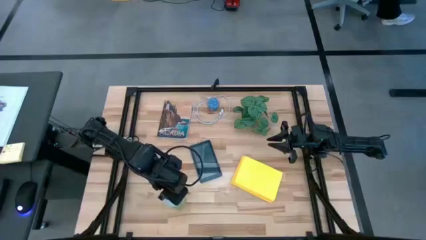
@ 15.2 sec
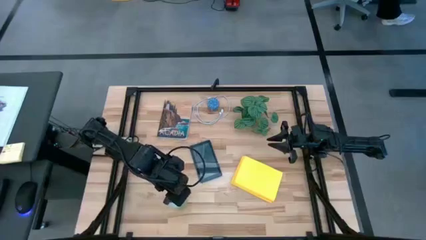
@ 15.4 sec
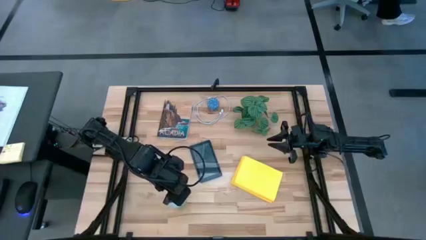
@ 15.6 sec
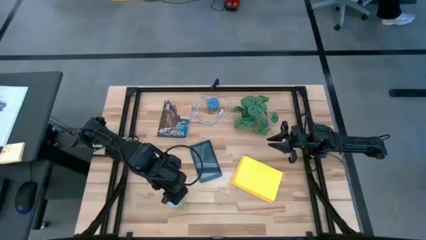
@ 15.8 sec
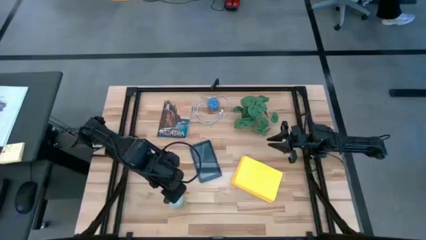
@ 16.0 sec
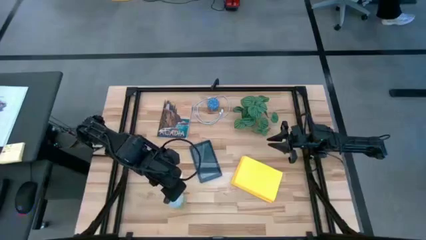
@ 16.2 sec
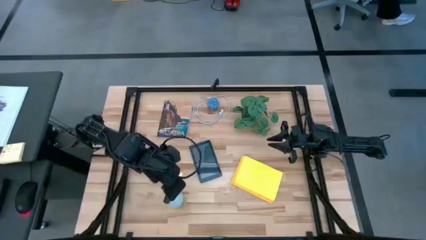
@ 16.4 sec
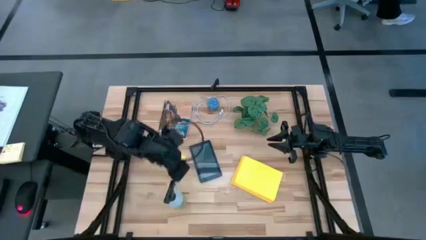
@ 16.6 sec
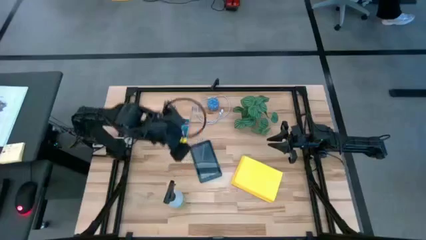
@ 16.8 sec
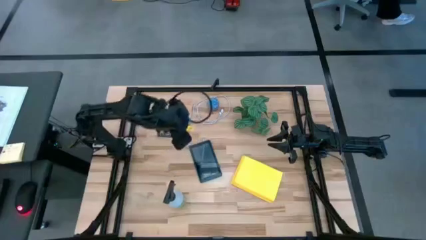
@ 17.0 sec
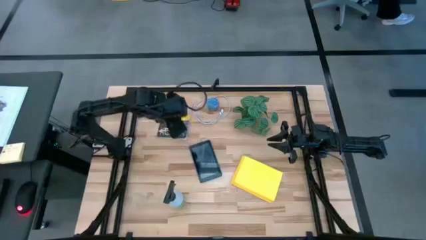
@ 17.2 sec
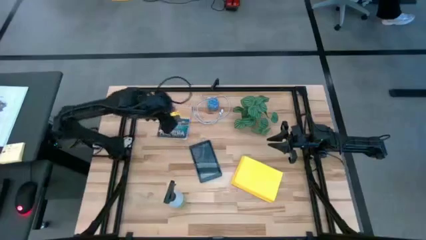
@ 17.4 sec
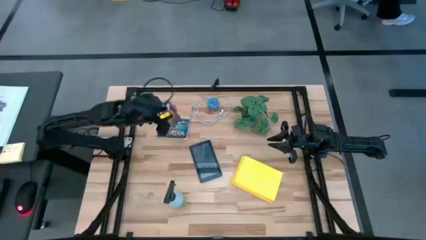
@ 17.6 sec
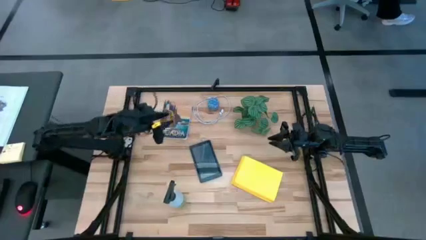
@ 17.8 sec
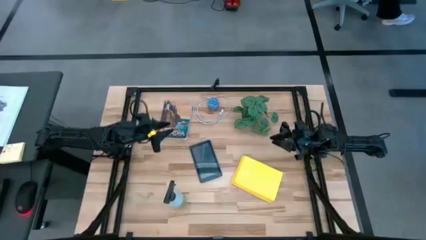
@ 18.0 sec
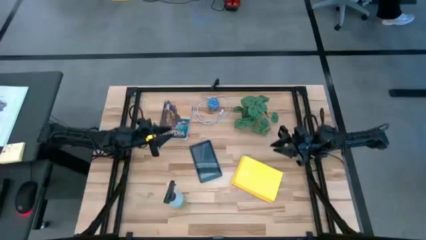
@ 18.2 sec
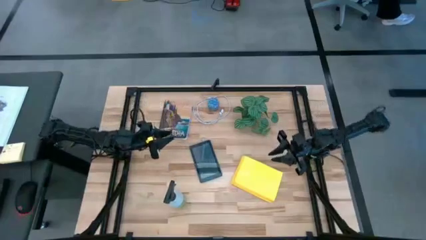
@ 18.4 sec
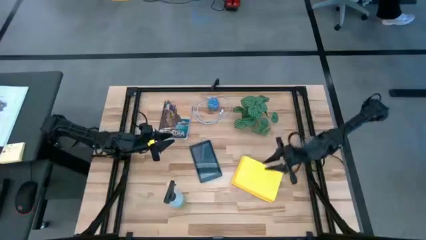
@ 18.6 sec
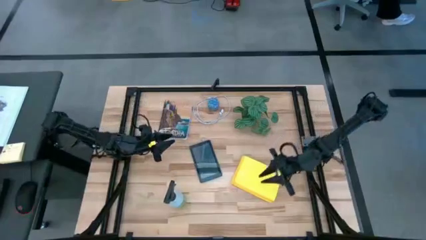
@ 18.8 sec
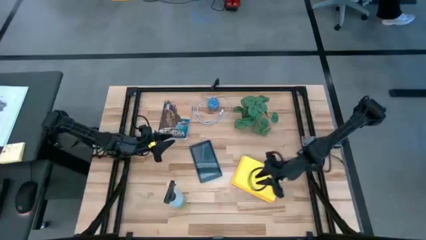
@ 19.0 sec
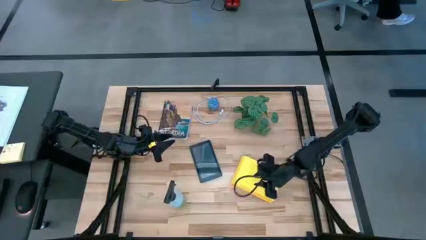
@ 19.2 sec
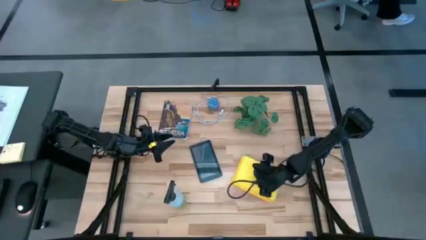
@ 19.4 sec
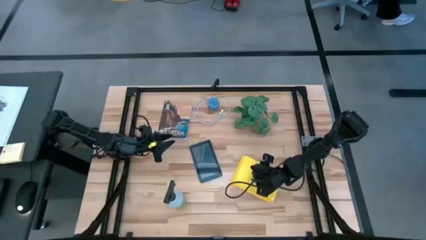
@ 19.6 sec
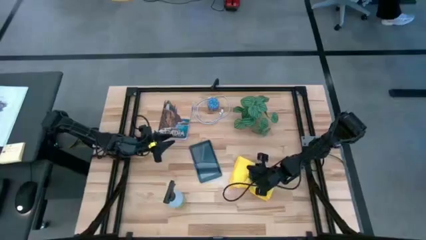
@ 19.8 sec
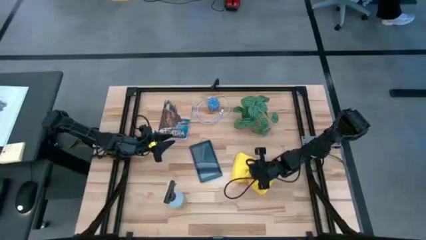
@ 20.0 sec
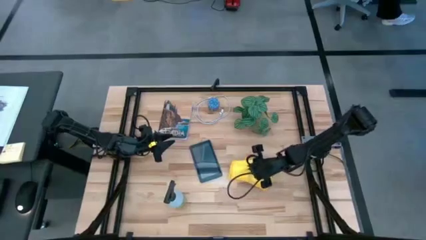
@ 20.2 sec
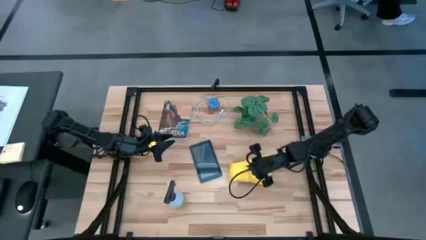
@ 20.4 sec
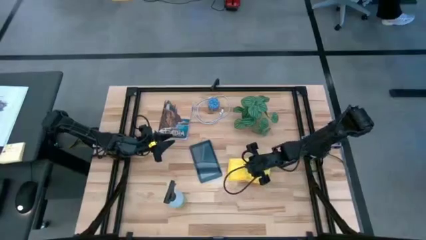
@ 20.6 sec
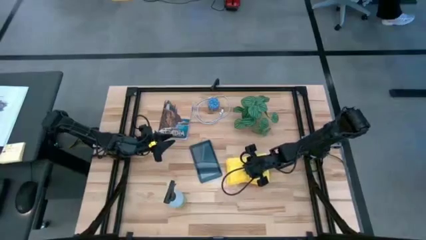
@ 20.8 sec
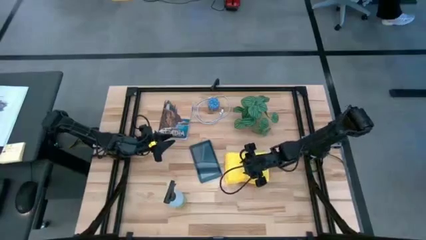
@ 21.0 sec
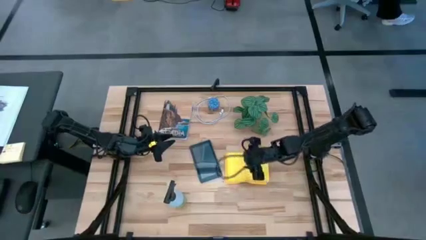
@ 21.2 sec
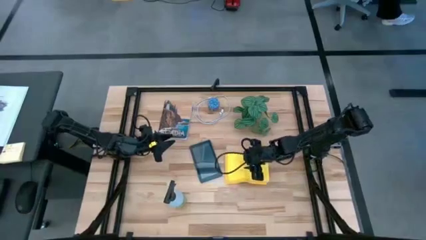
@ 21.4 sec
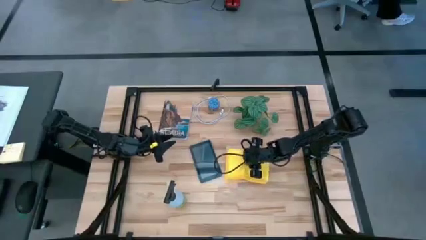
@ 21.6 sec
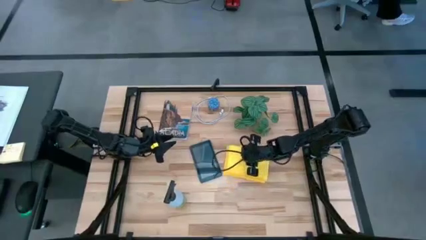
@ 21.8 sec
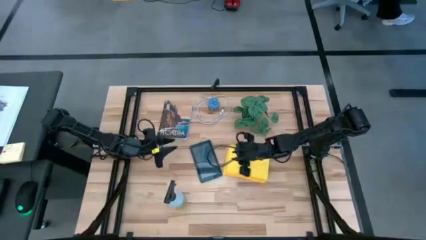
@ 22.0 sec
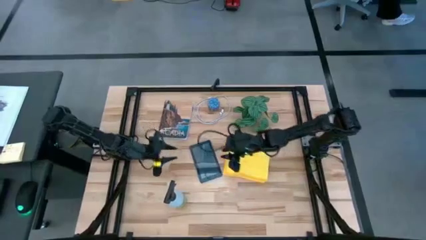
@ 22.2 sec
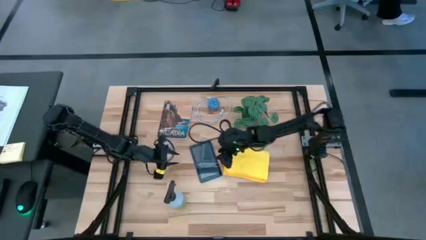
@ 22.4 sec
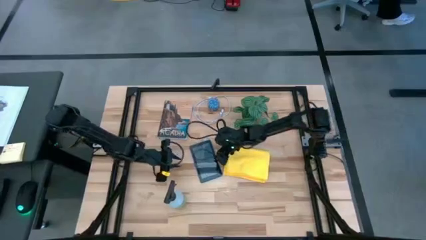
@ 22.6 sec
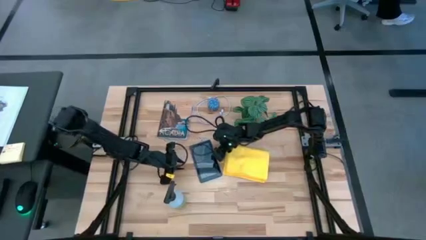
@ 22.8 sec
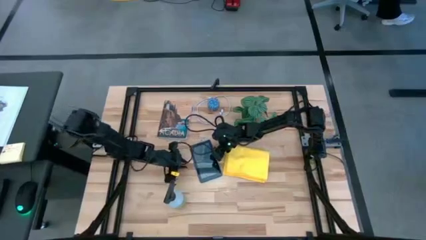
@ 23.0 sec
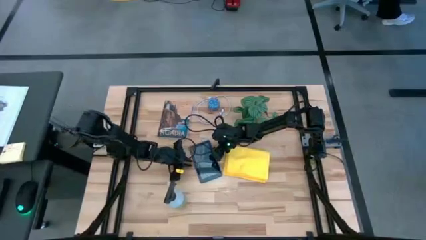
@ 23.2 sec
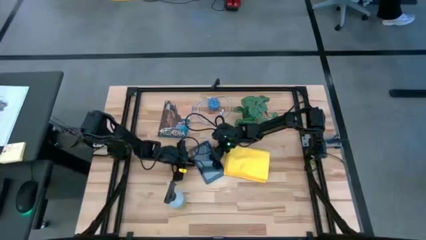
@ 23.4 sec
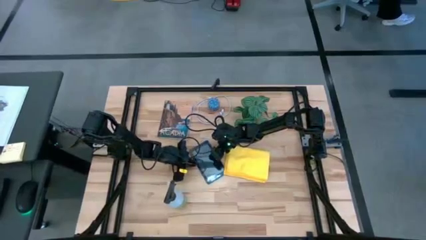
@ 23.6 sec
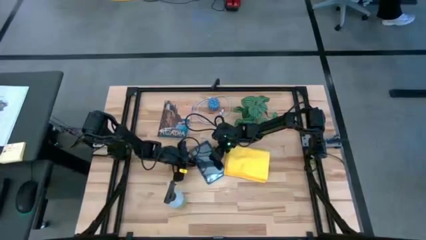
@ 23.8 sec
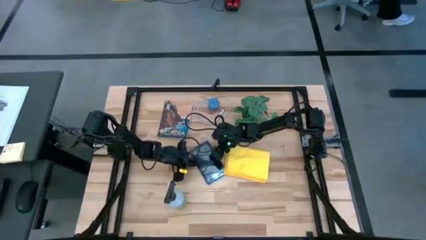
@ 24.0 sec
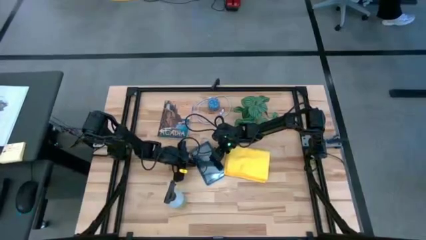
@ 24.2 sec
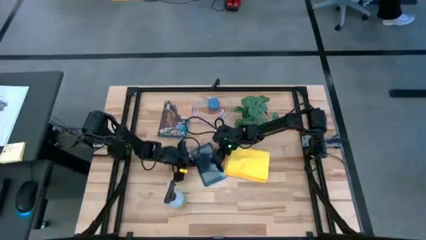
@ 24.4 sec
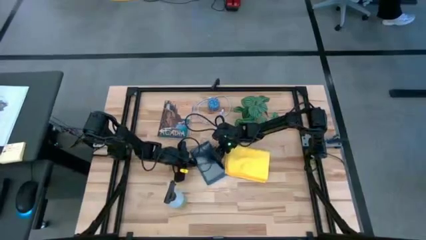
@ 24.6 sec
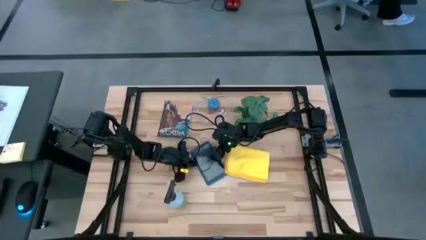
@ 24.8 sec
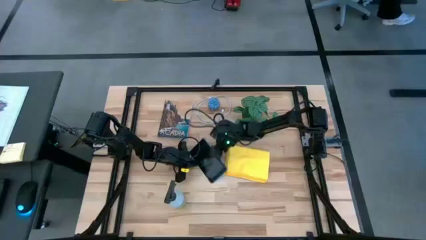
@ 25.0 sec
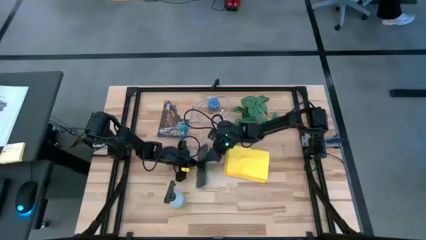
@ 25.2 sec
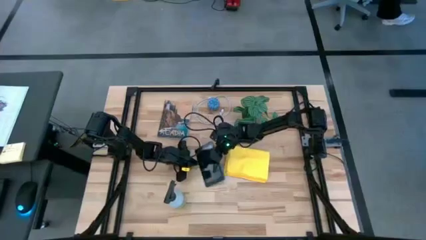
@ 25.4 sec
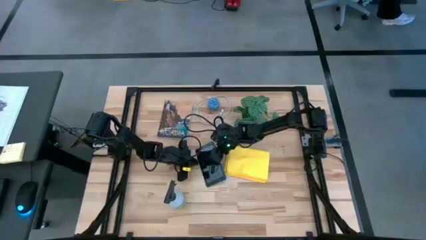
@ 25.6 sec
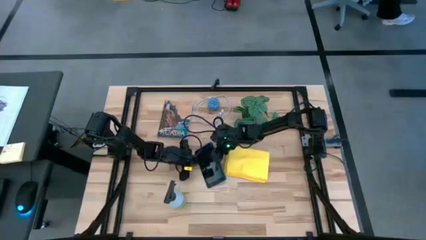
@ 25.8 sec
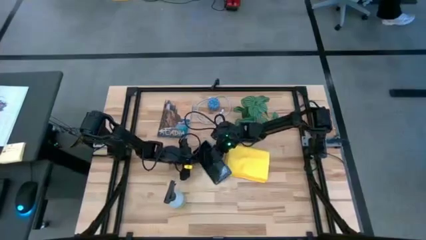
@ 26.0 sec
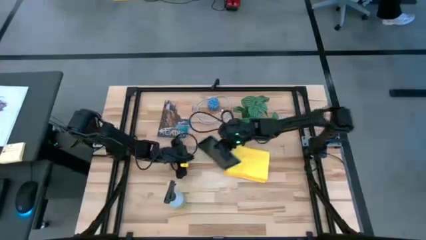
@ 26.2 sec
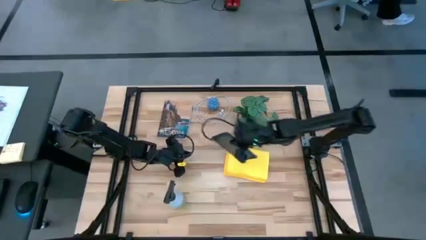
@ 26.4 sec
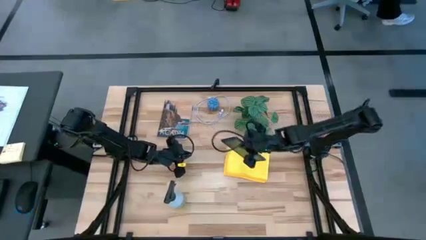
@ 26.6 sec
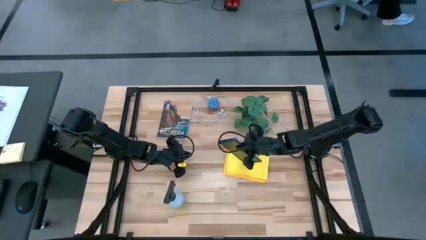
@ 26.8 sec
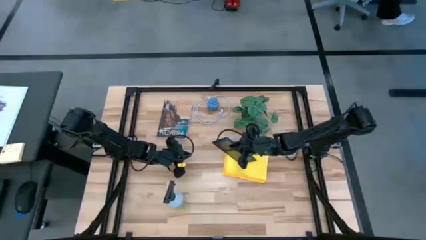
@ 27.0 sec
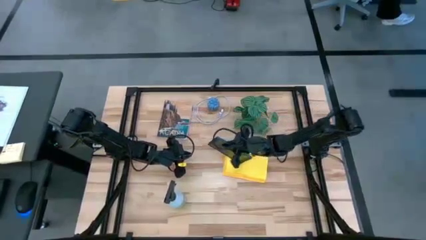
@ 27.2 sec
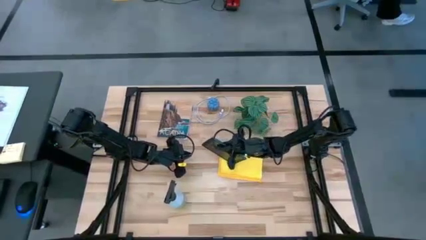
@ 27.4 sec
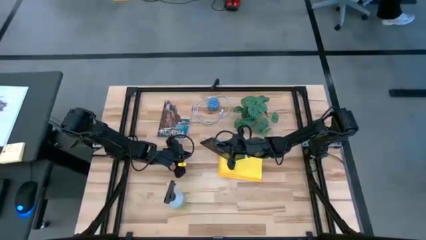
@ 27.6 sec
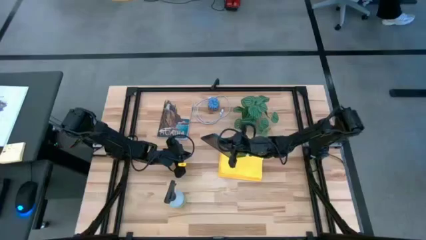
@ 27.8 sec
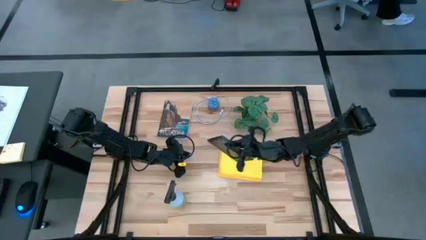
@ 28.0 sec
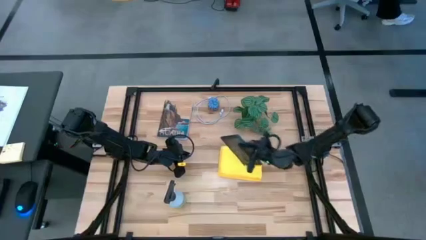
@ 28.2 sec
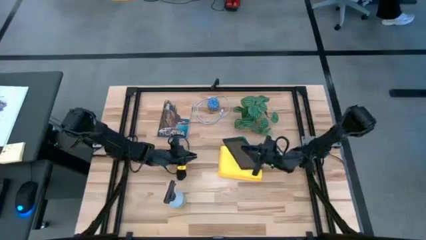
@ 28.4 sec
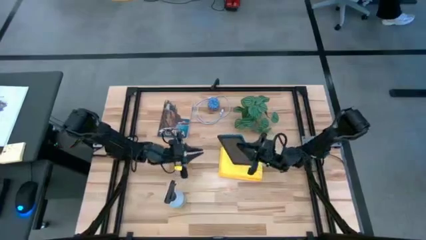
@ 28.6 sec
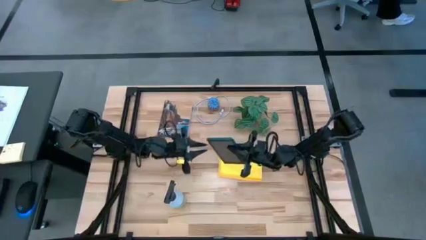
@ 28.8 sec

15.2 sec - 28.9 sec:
Task: Apply microfiber cloth
Spray the front of the blue tablet
